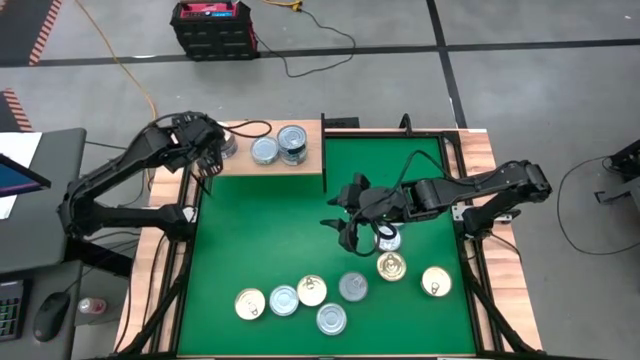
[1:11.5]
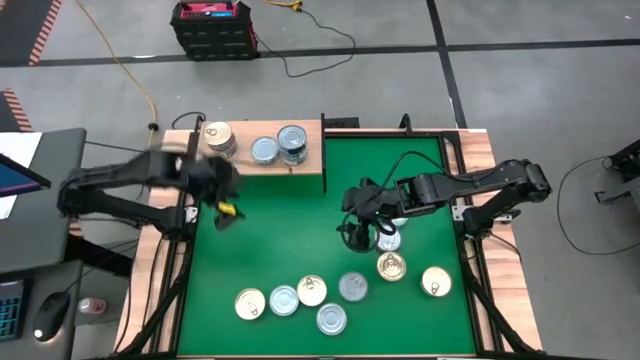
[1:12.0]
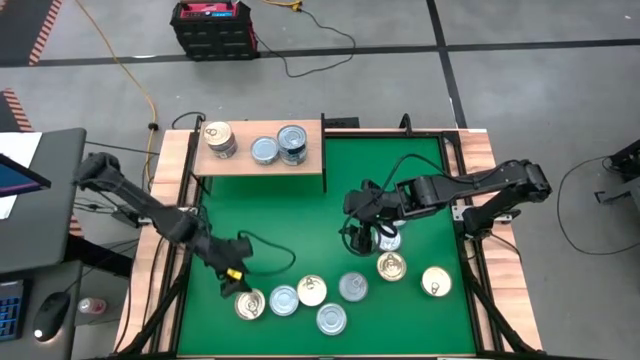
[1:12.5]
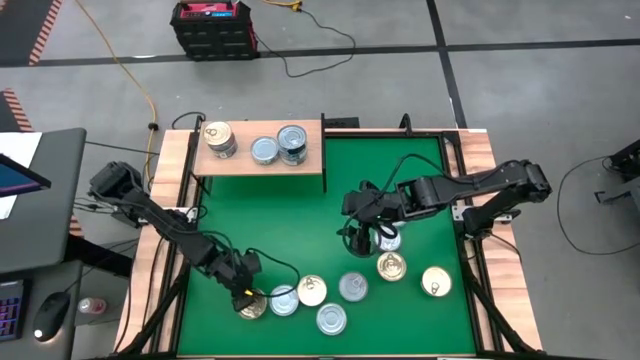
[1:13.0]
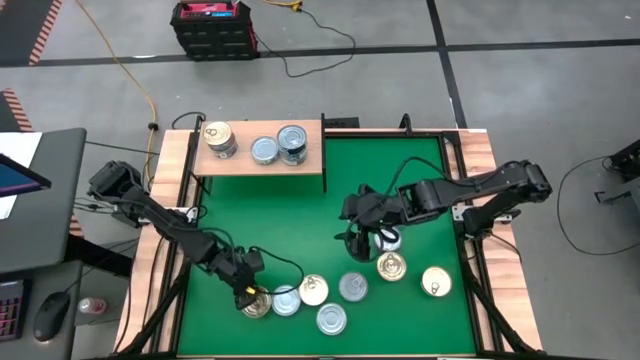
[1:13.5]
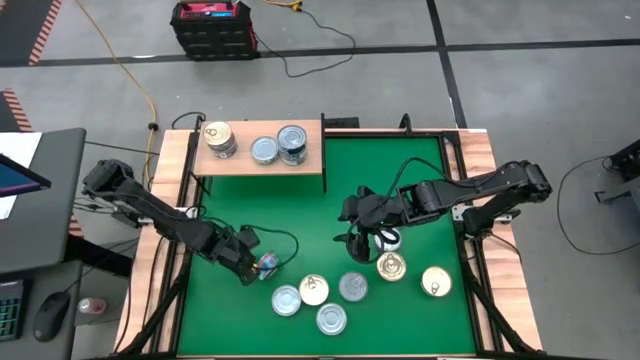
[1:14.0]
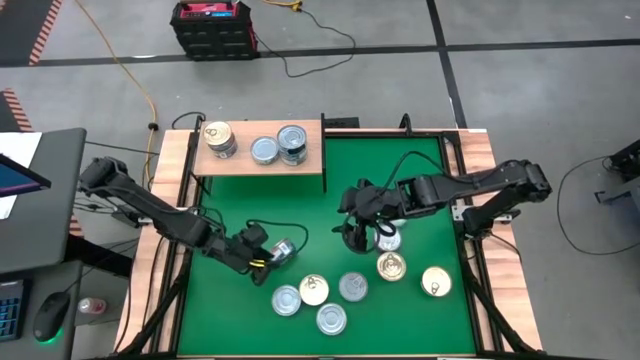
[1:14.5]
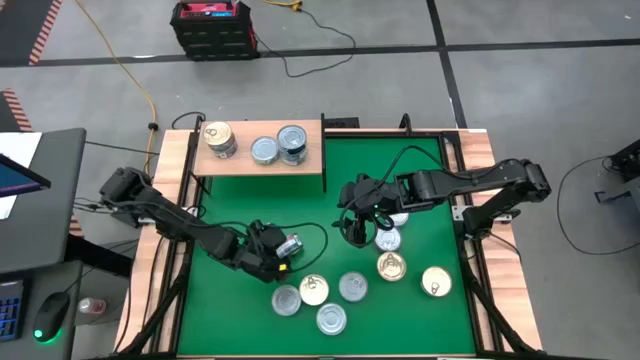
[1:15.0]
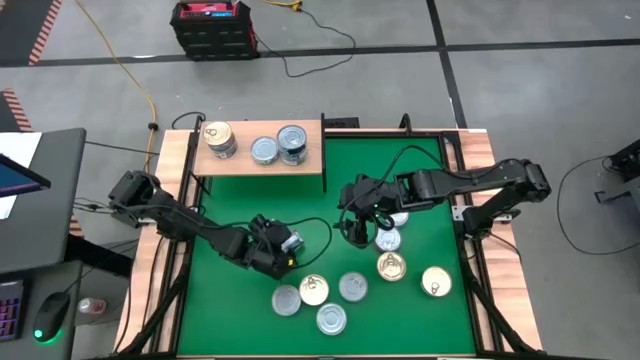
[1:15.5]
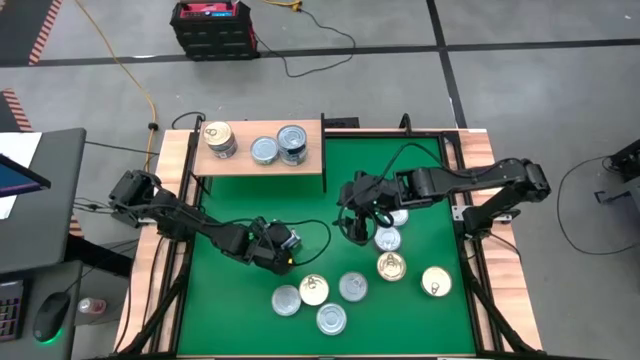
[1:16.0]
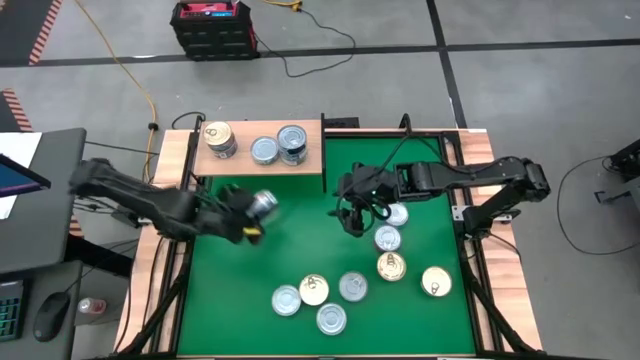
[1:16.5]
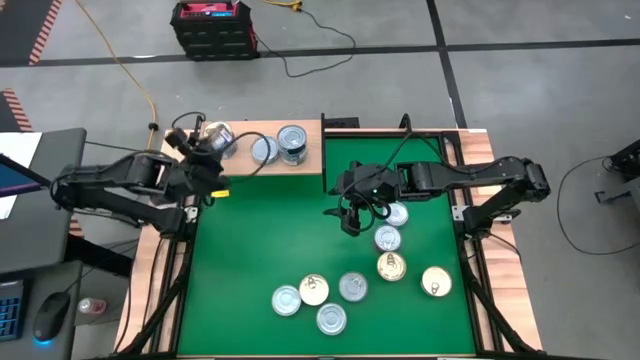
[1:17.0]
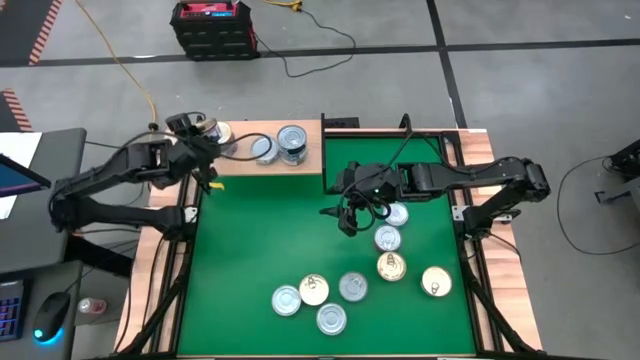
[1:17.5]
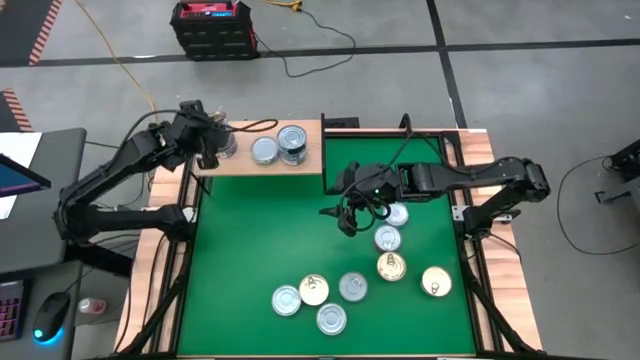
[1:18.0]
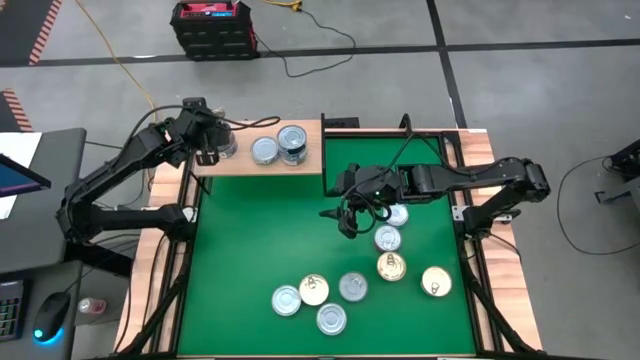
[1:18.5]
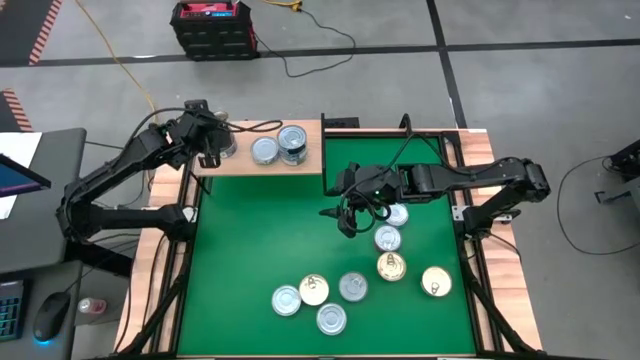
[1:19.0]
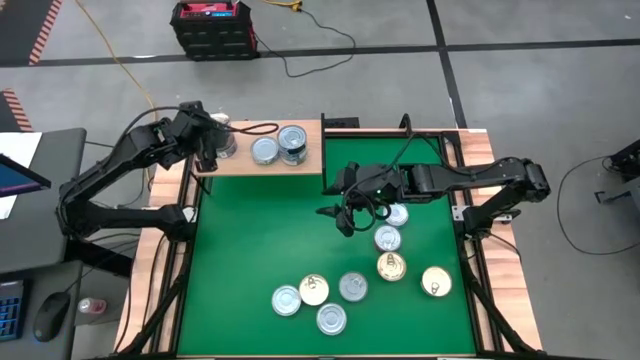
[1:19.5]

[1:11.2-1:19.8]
Task: Stack canned seafood by type on shelf
Stack the blue and pink tuna can on top of the blue and pink tuna cans on the shelf

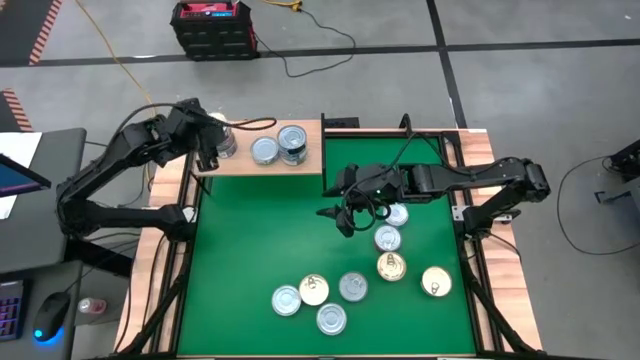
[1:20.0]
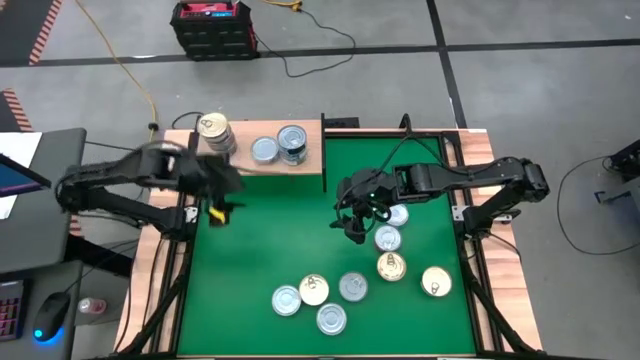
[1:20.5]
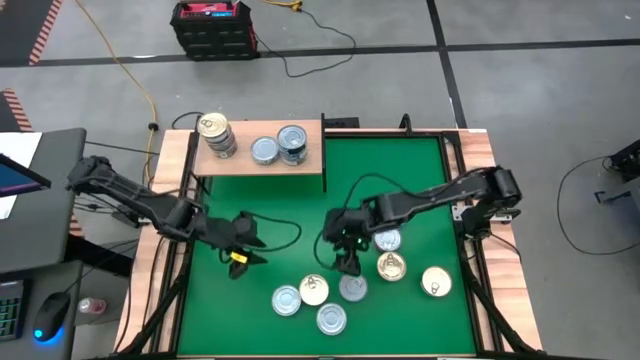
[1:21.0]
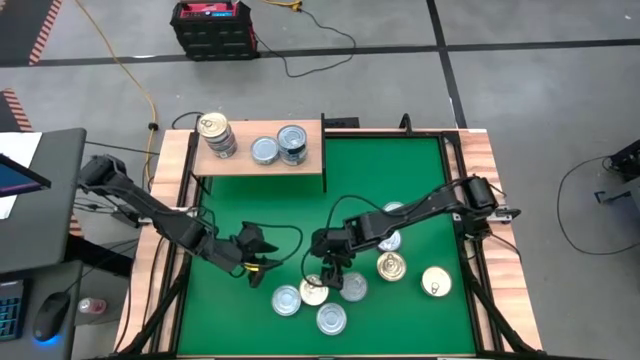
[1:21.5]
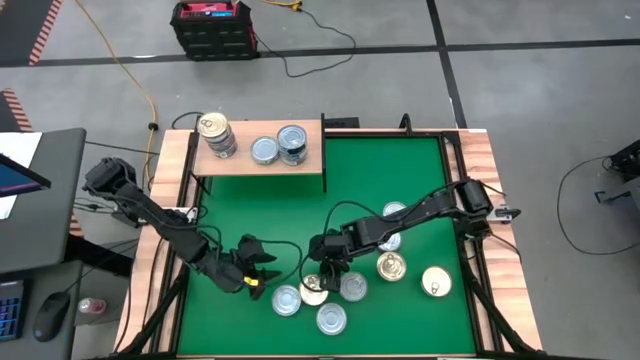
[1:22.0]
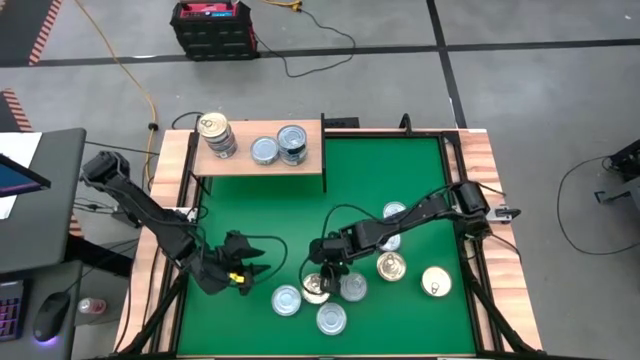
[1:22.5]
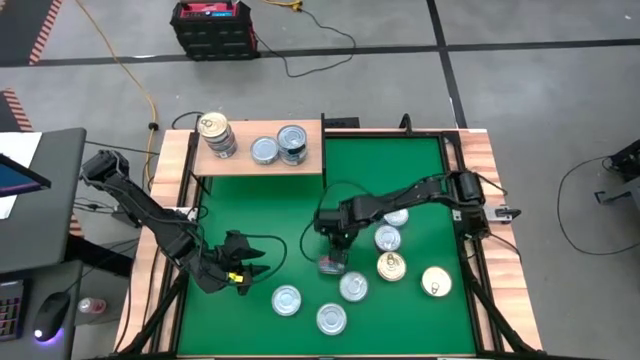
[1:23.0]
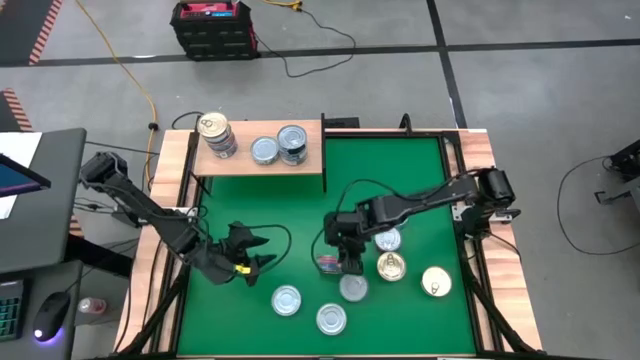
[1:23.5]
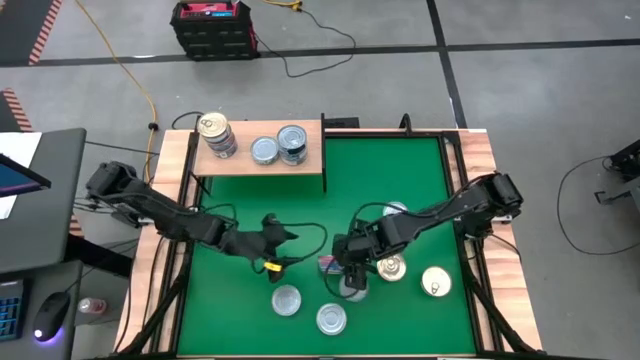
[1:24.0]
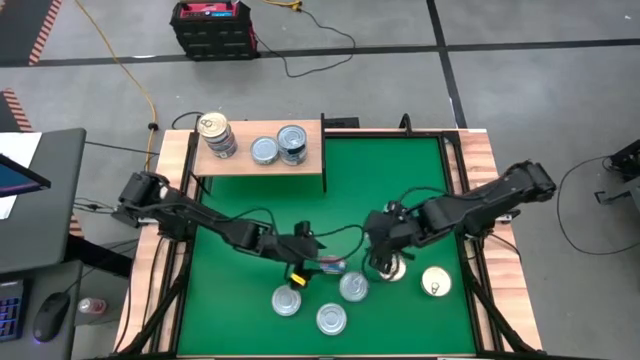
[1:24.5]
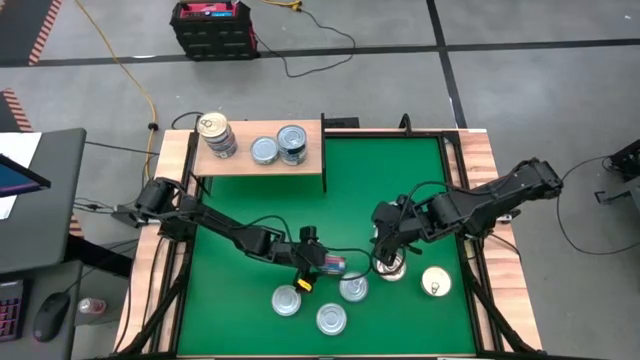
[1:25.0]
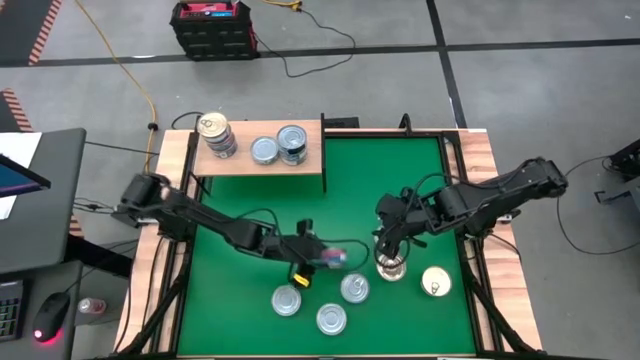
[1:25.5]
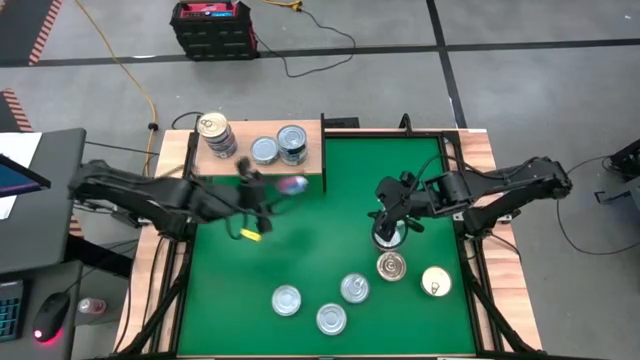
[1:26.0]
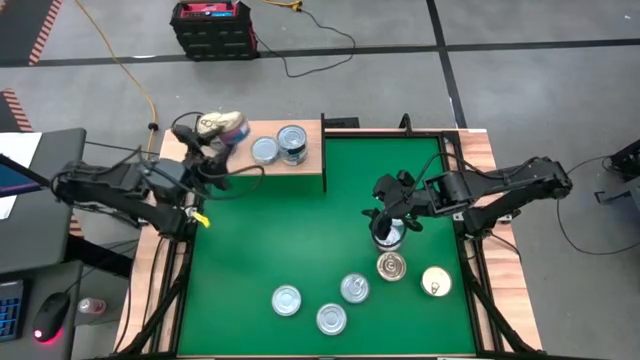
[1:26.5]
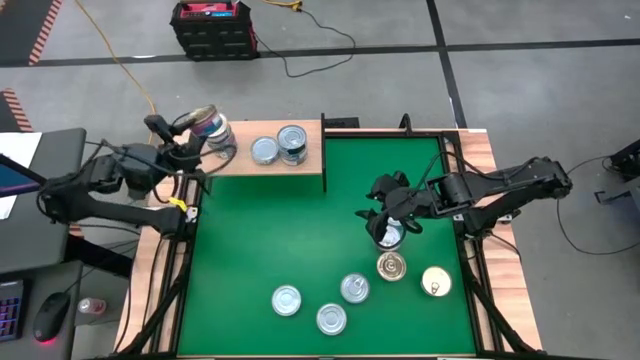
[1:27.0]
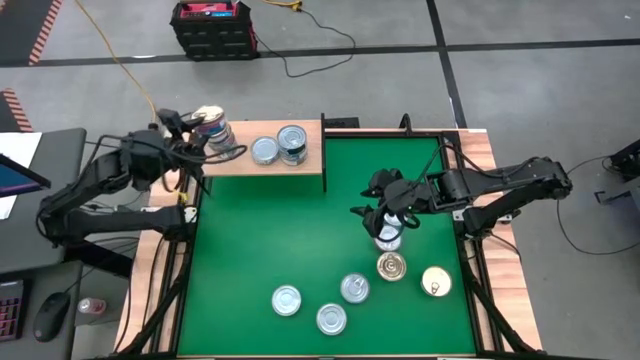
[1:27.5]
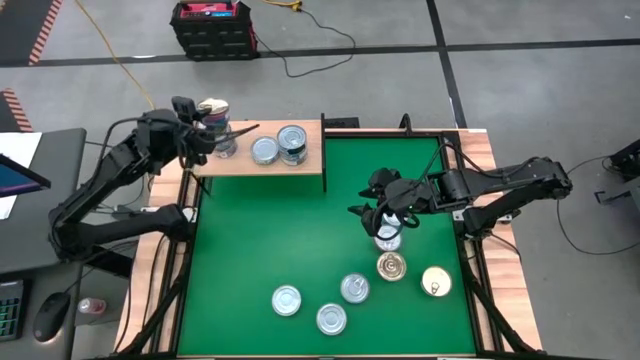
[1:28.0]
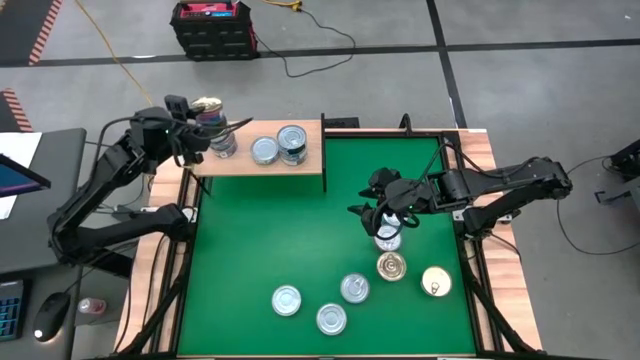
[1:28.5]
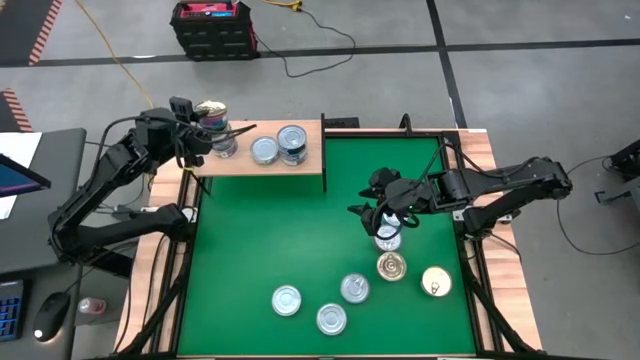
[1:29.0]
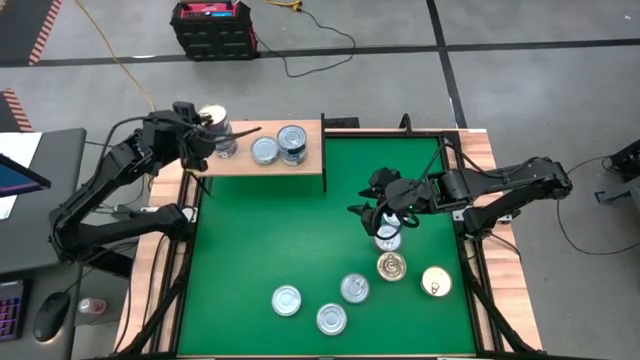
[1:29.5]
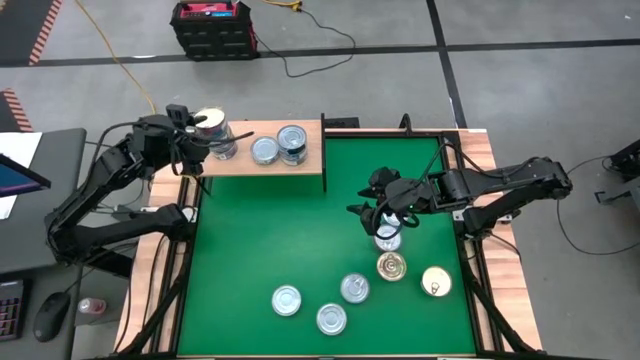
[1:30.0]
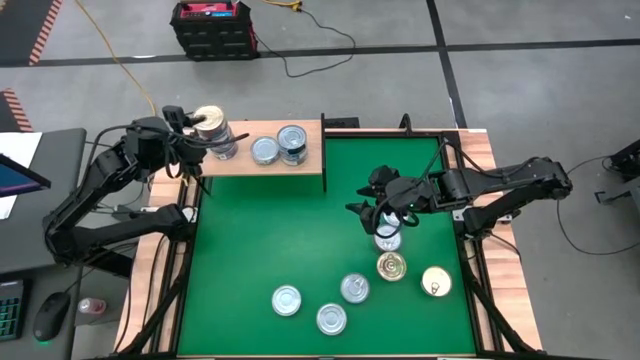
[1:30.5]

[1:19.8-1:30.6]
Stack the blue and pink tuna can on top of the blue and pink tuna cans on the shelf

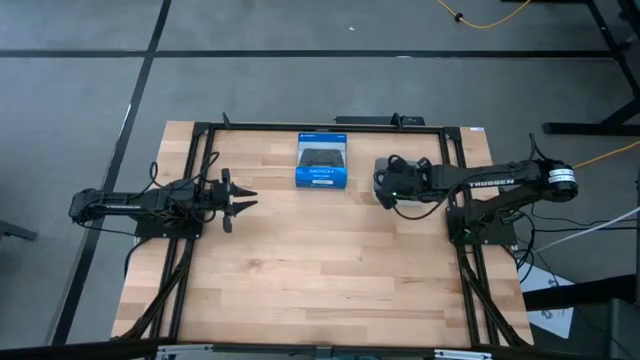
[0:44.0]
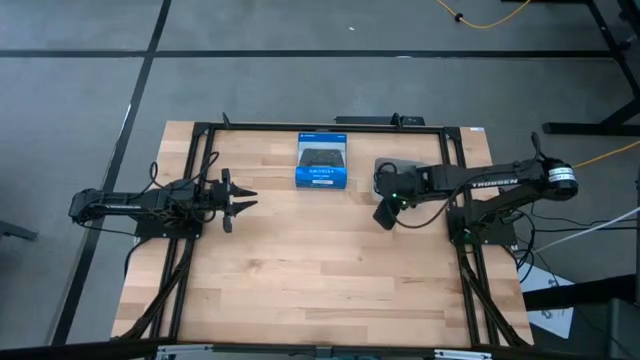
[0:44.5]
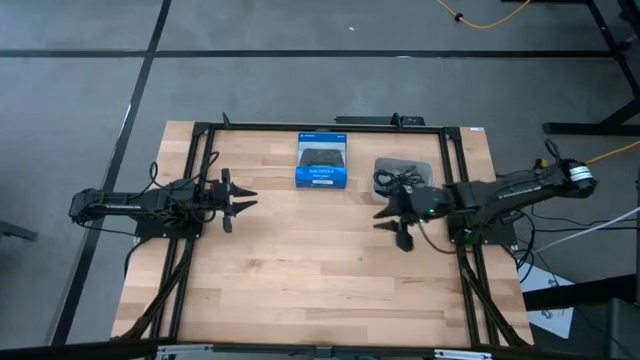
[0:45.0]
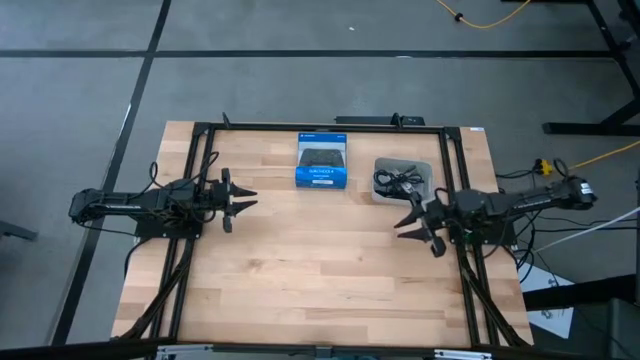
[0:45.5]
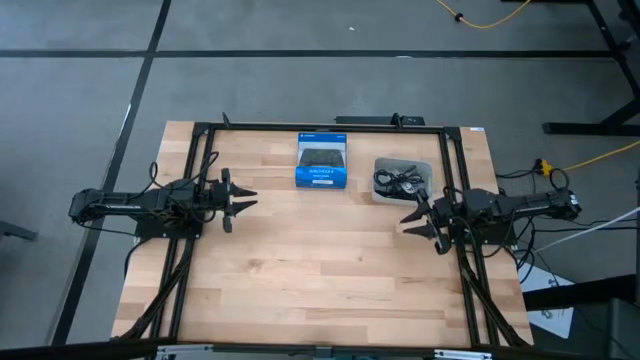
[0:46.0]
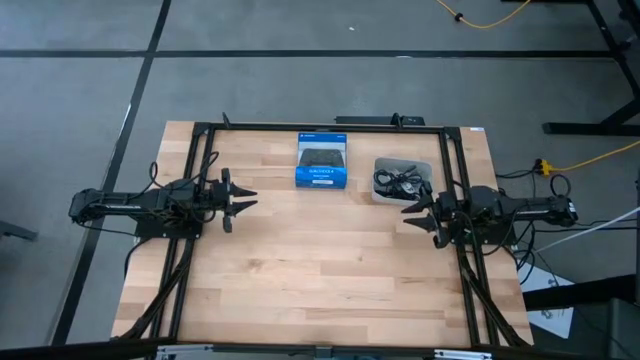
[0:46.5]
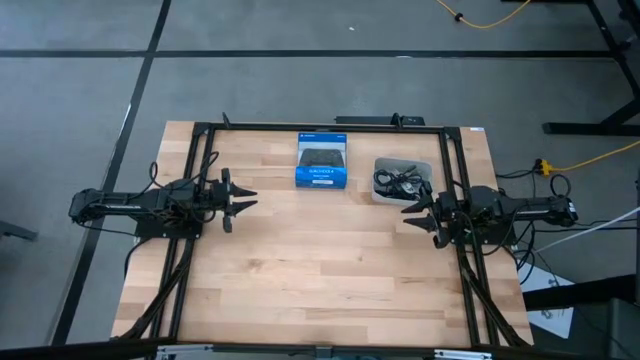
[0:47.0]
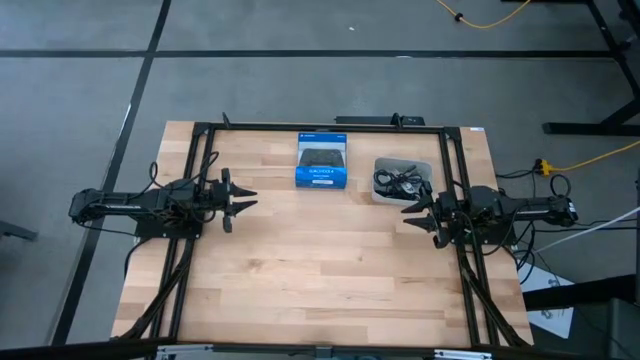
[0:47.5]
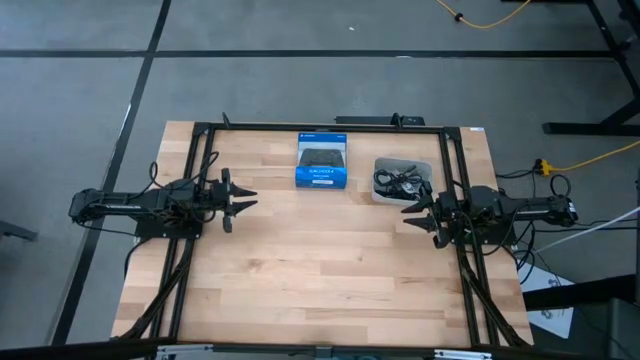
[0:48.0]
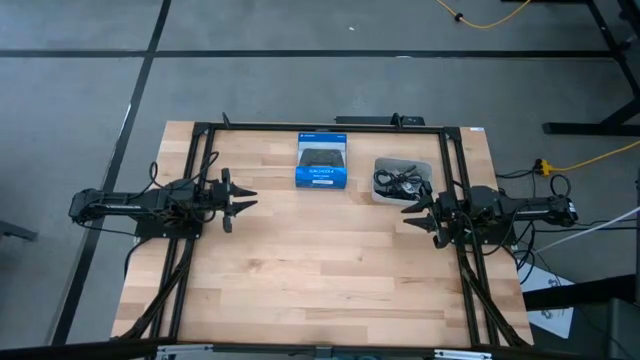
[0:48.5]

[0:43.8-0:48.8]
Task: Pick and place USB-C Cables
Return to Home Position
